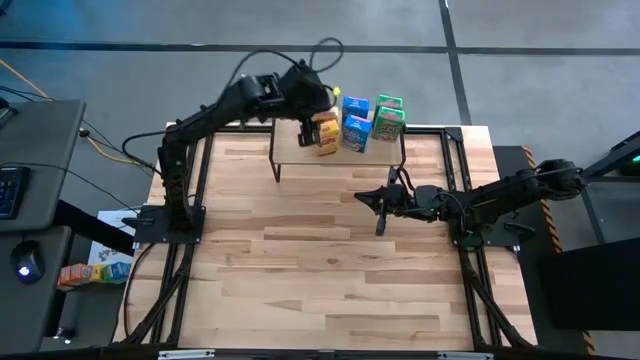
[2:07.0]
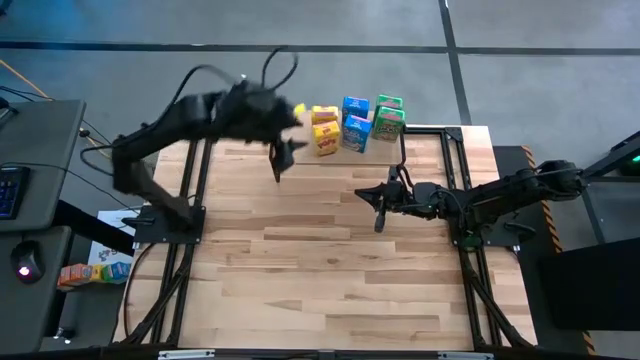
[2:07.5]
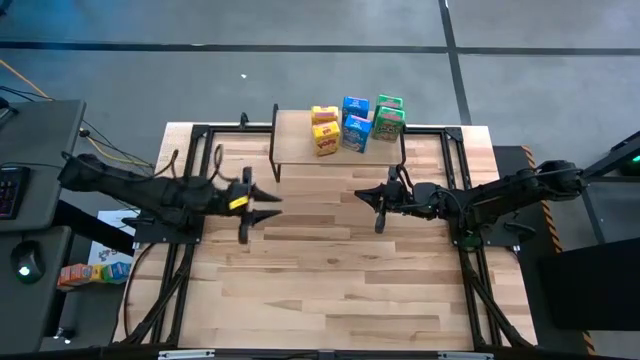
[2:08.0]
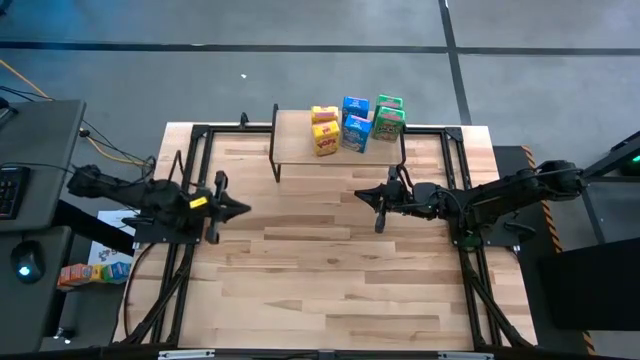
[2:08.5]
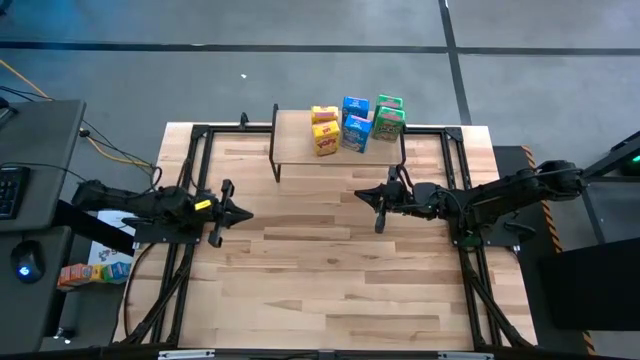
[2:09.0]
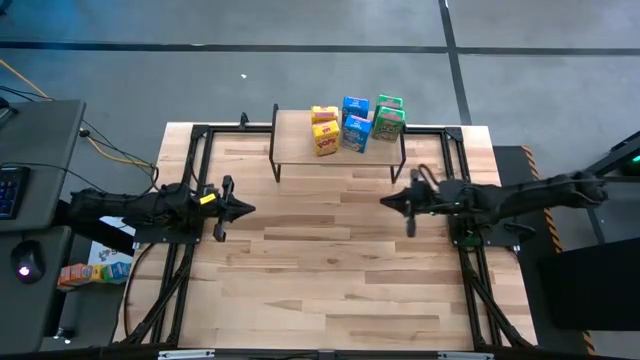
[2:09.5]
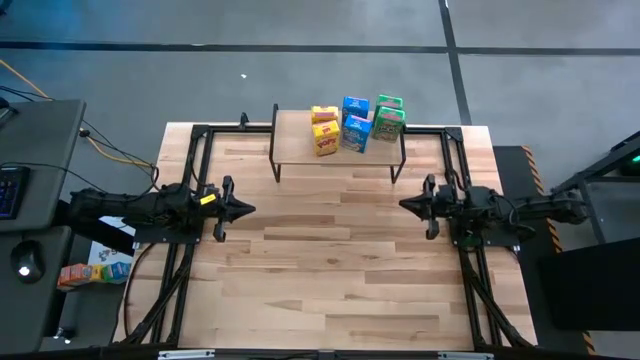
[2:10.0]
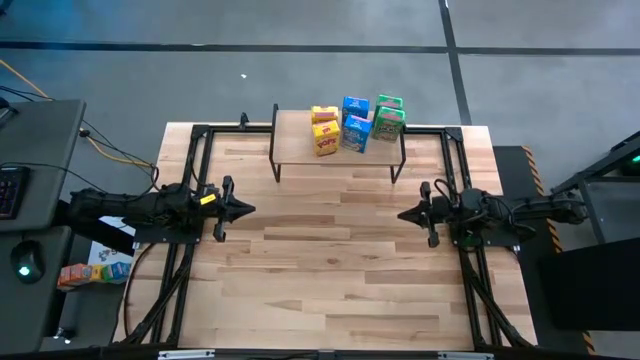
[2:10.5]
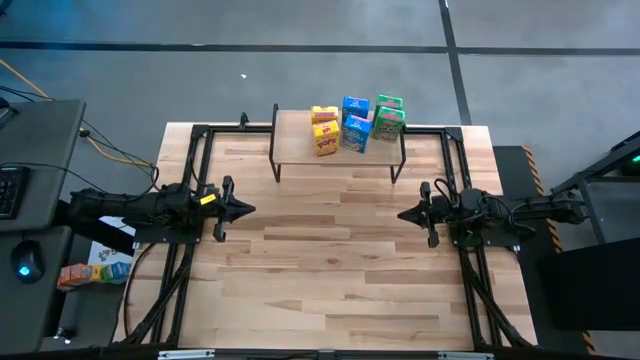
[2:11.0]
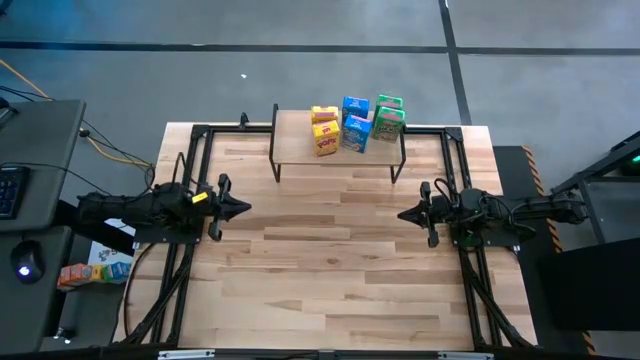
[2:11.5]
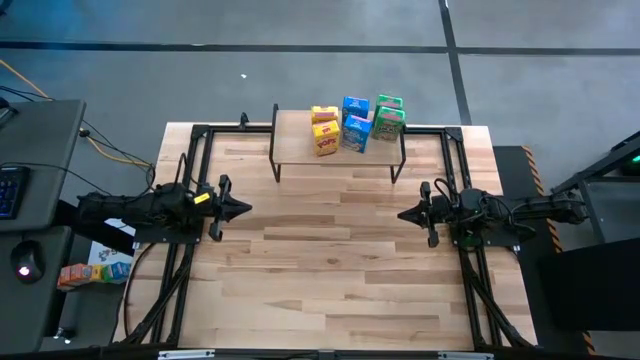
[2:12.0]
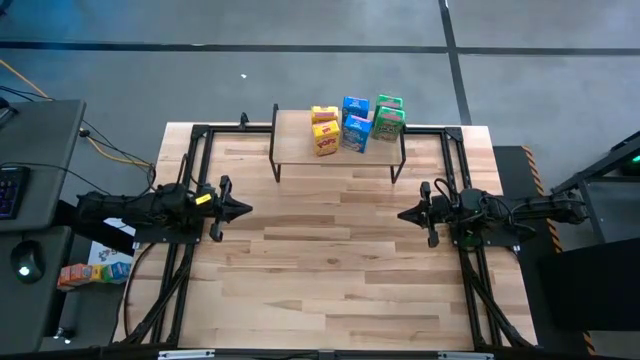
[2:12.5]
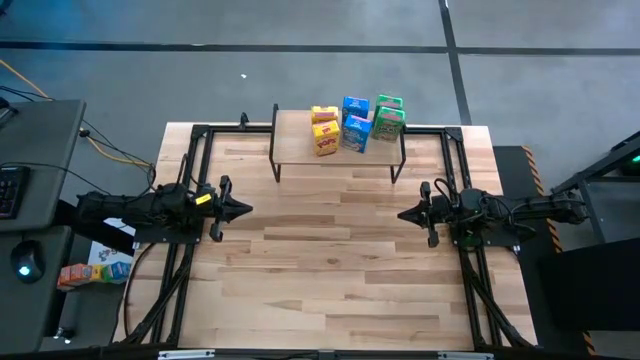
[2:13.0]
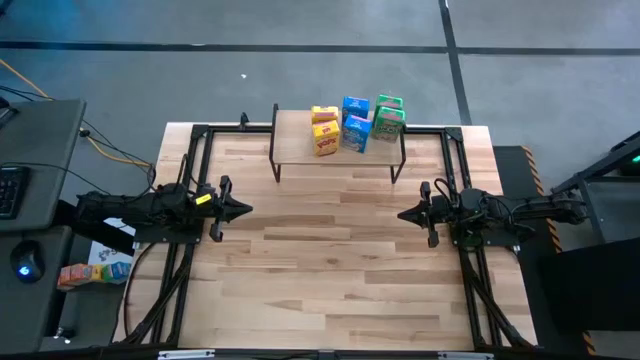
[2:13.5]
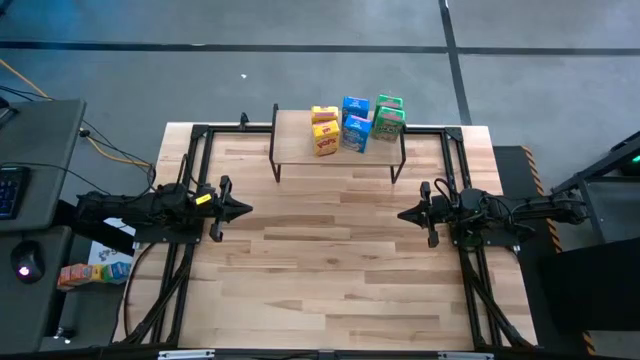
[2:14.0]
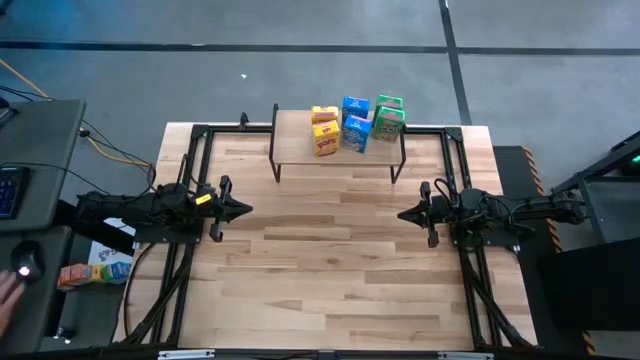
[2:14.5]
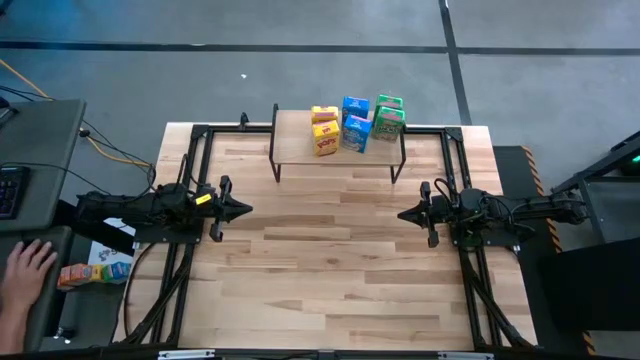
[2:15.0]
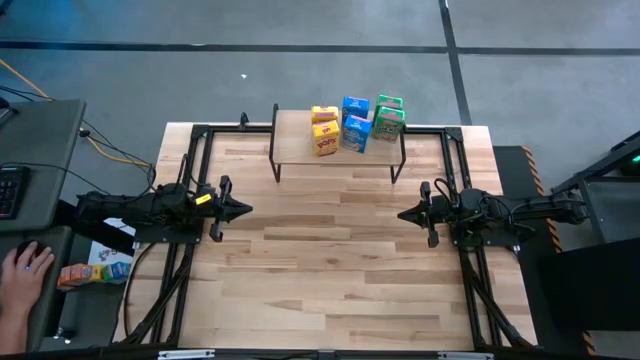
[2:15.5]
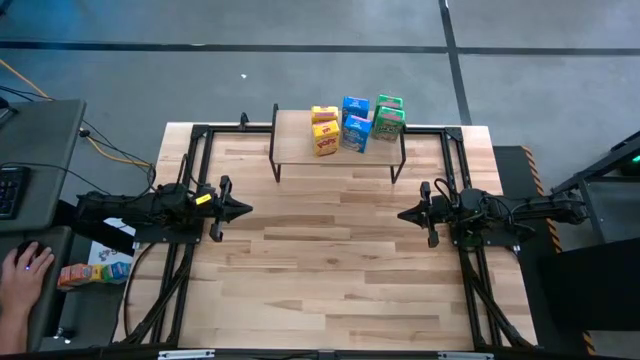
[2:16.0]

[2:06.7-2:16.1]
Task: Stack cereal on shelf
Return to Home Position

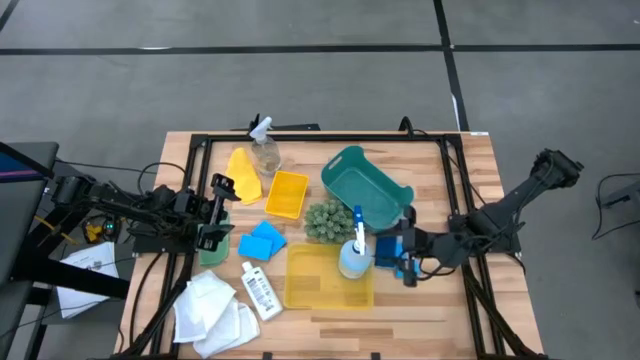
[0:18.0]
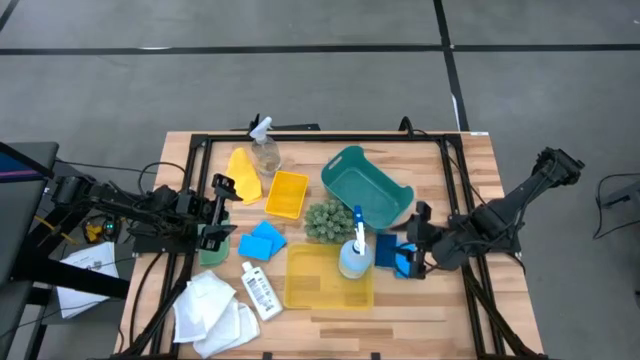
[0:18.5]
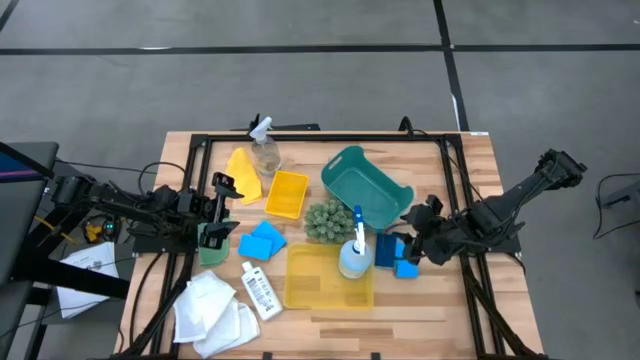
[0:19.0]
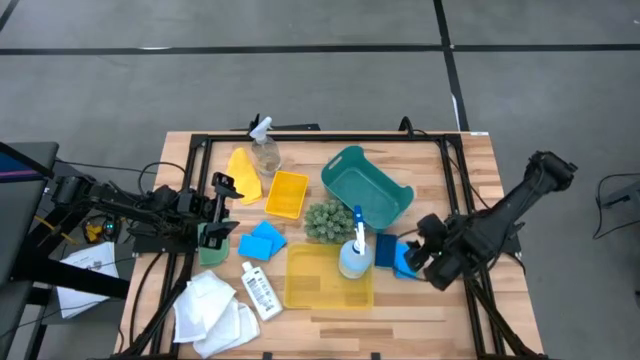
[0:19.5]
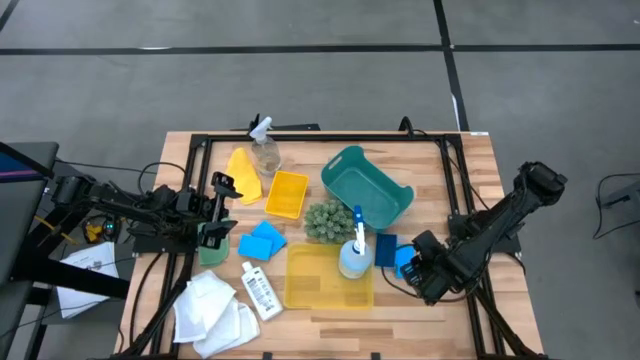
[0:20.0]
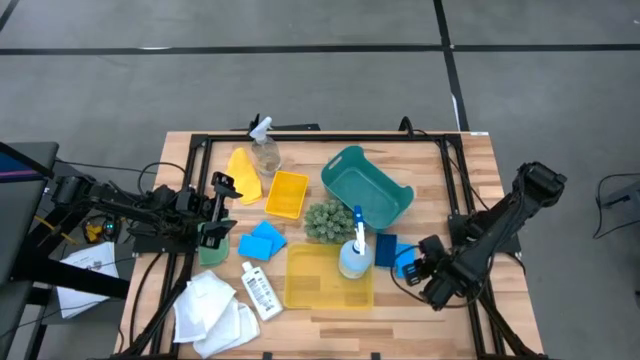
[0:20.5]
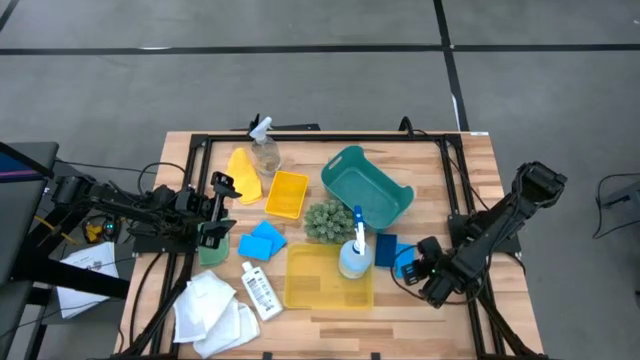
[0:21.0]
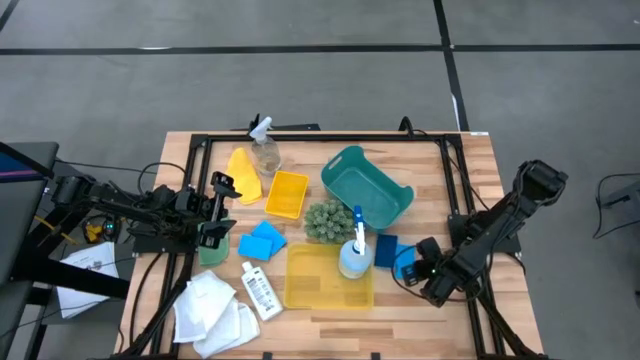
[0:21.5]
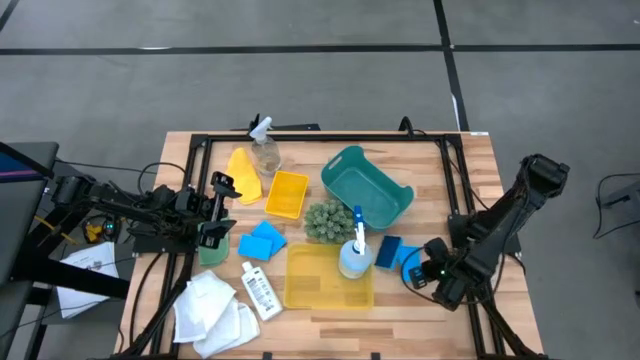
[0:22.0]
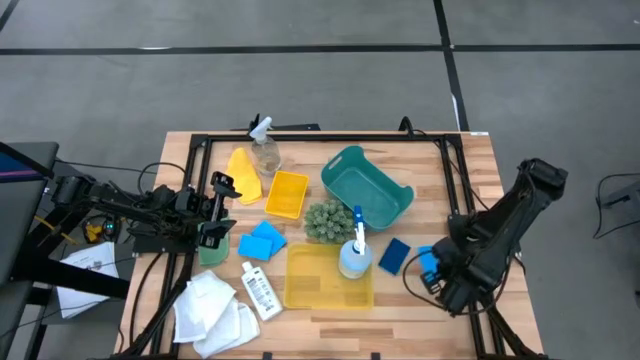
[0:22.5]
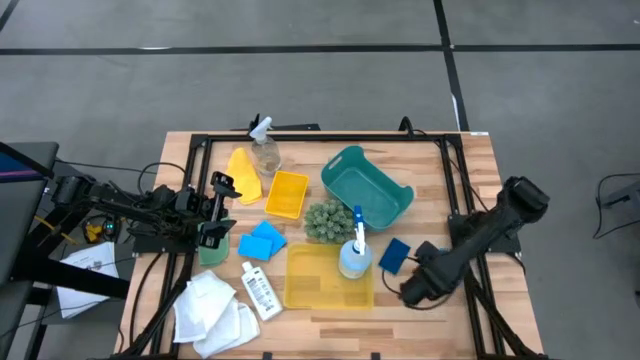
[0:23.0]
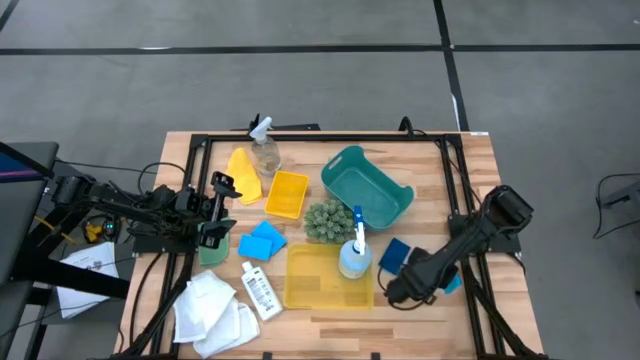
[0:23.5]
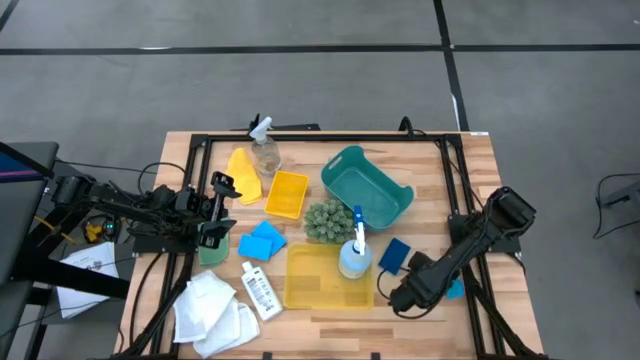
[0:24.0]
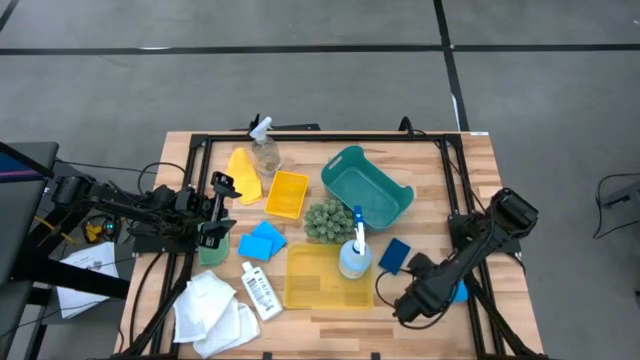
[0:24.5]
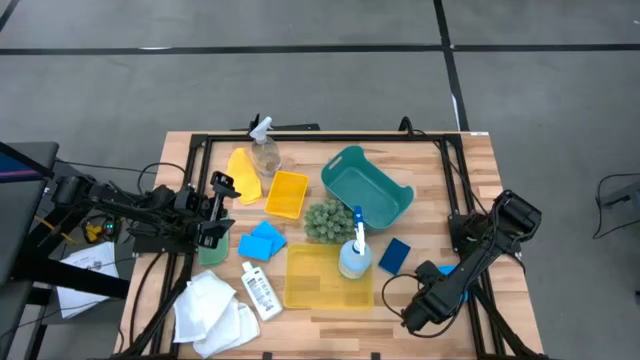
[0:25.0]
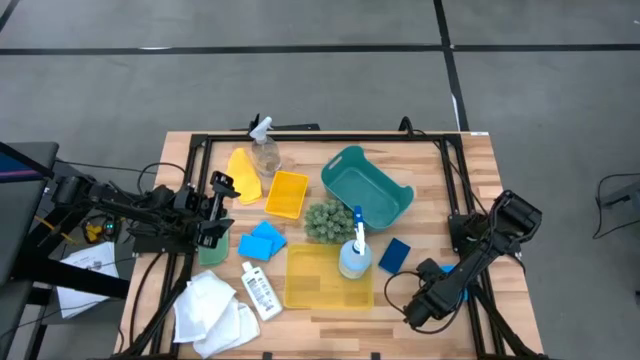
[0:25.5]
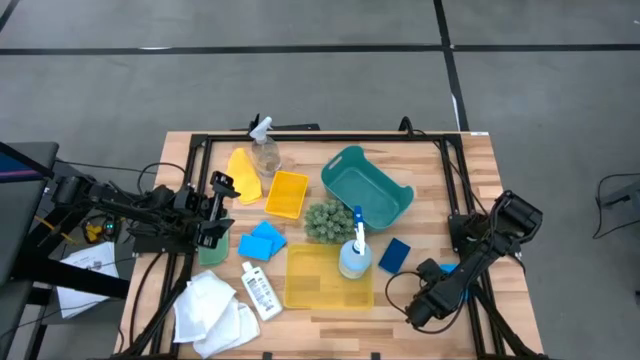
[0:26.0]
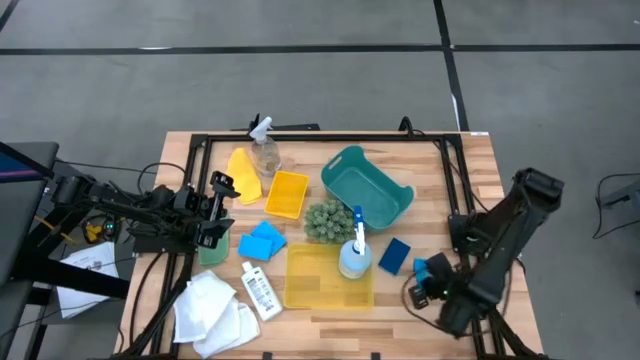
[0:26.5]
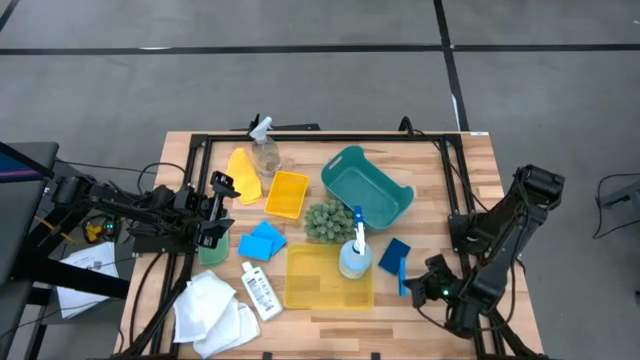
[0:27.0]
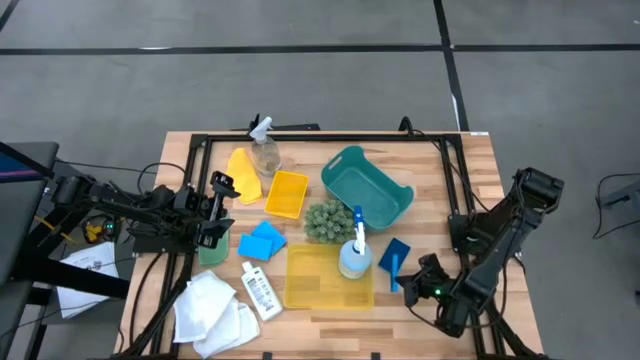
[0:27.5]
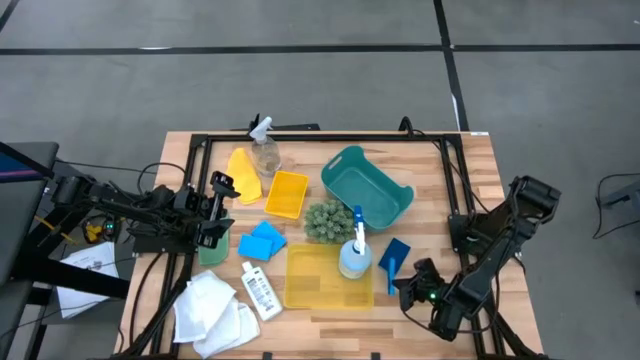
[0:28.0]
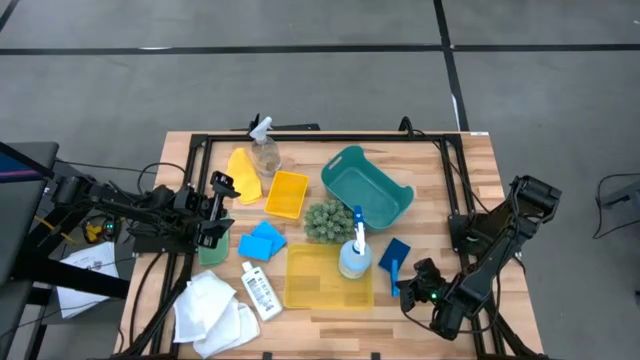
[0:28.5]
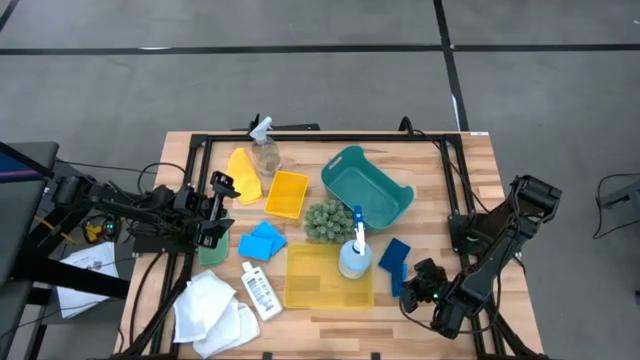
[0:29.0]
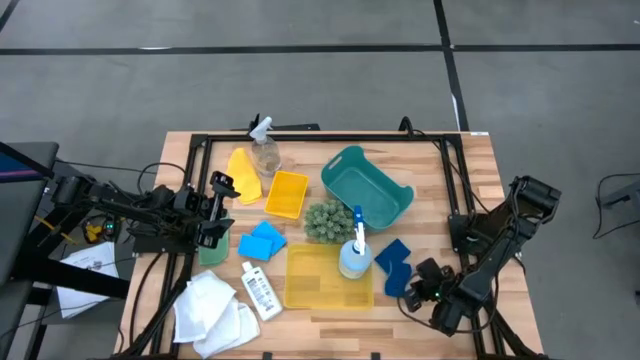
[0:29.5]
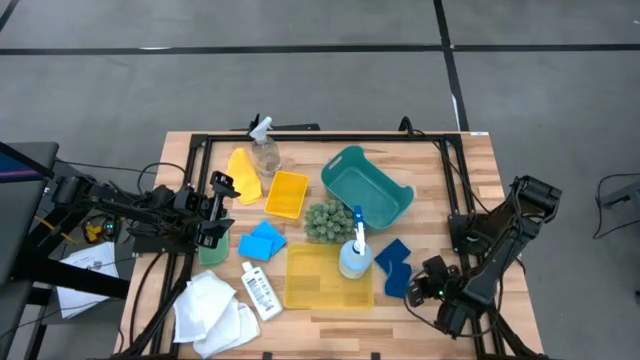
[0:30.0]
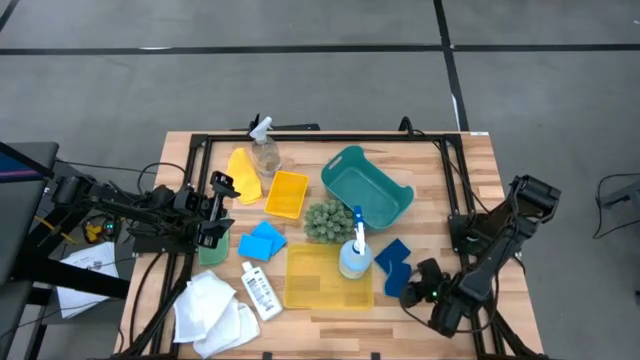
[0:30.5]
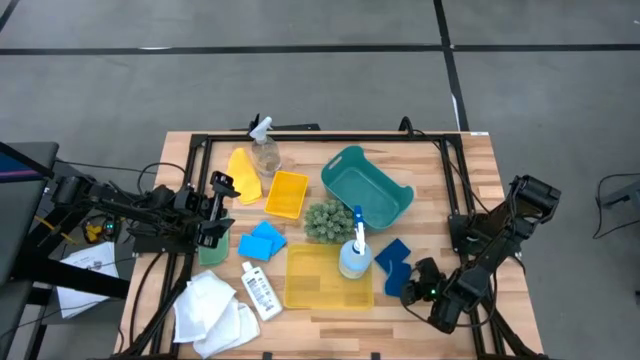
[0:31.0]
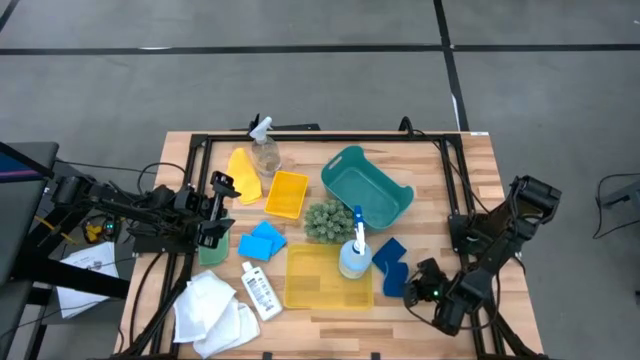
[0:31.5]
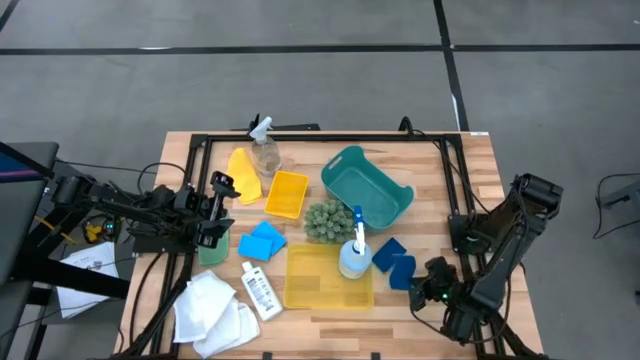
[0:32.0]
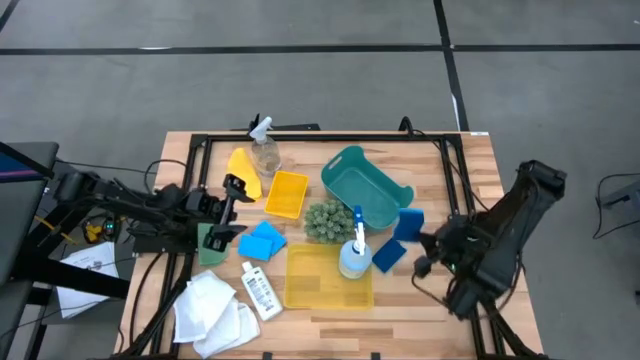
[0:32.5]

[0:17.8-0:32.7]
Task: Pick & Place Kitchen Items
Put the blue sponge into the top yellow bin
